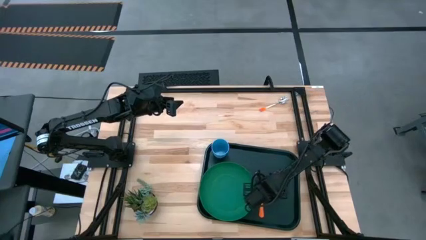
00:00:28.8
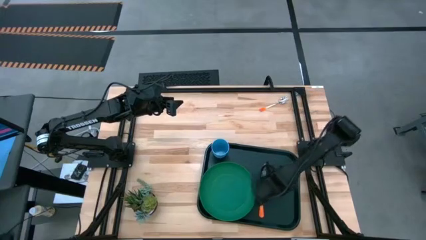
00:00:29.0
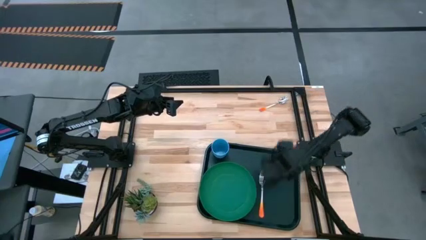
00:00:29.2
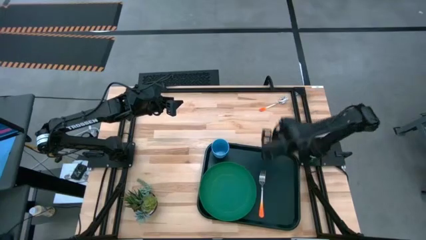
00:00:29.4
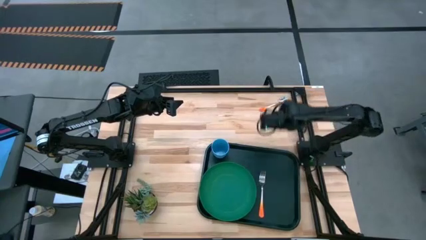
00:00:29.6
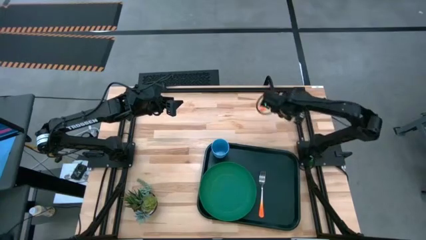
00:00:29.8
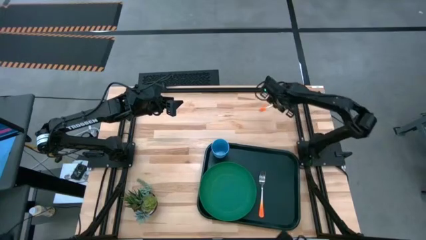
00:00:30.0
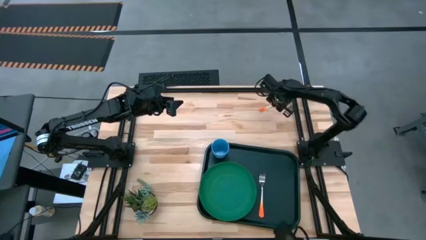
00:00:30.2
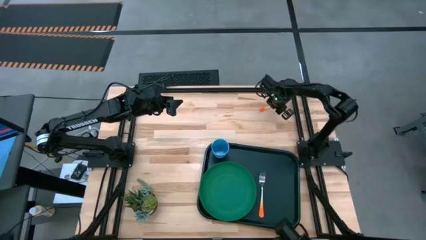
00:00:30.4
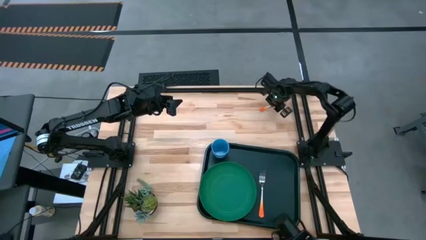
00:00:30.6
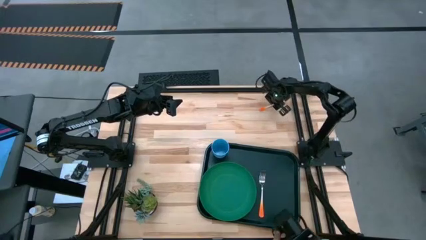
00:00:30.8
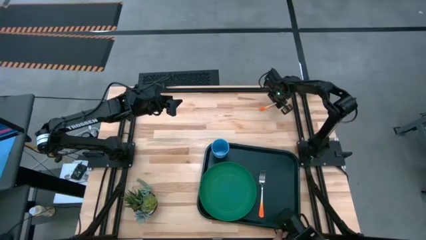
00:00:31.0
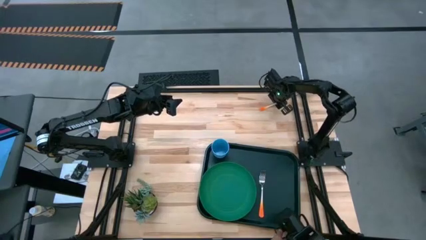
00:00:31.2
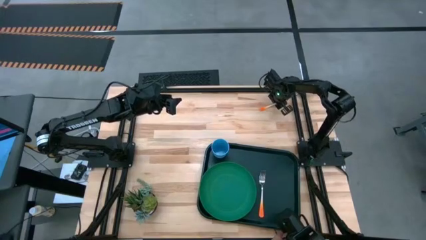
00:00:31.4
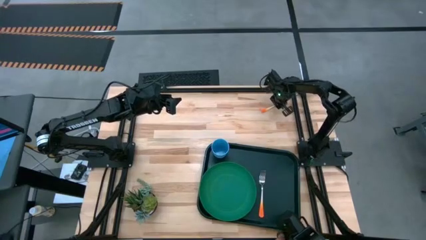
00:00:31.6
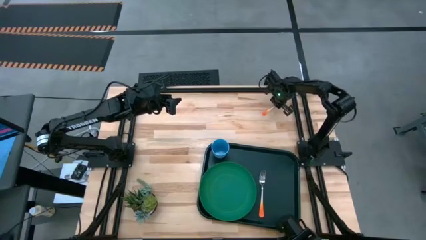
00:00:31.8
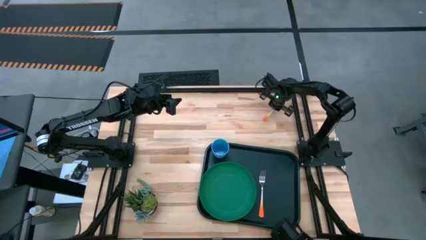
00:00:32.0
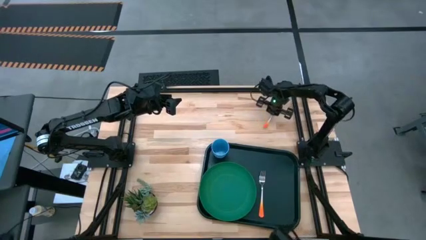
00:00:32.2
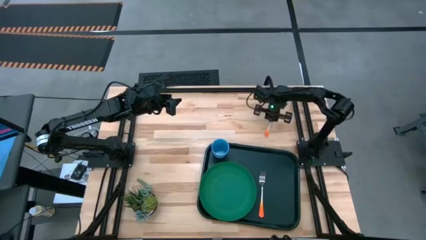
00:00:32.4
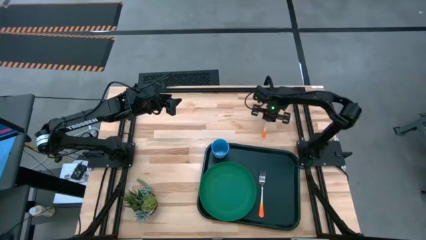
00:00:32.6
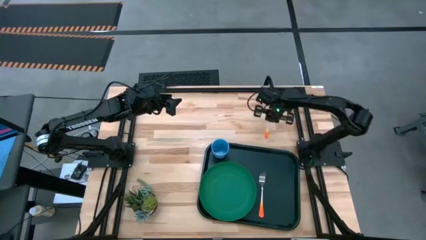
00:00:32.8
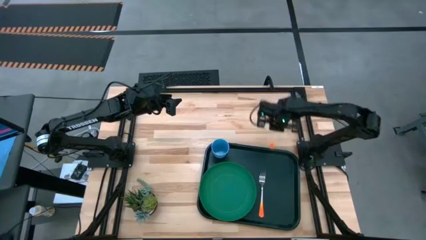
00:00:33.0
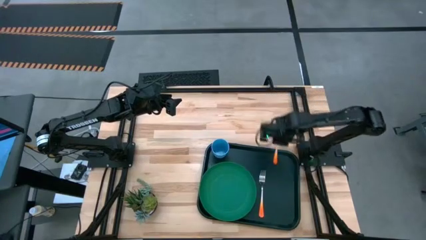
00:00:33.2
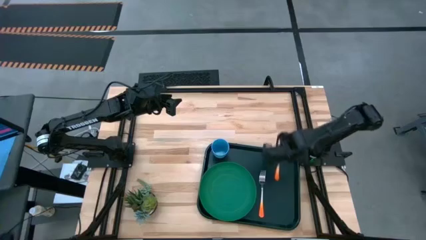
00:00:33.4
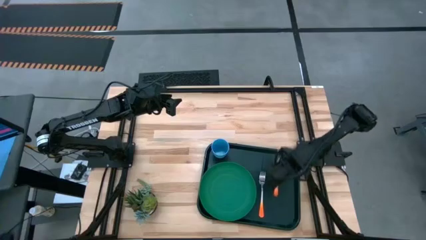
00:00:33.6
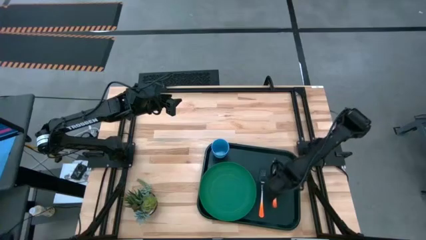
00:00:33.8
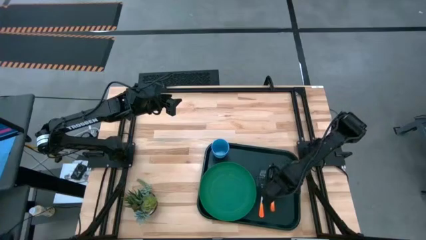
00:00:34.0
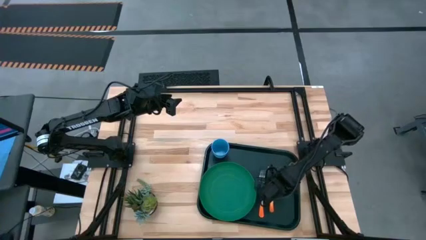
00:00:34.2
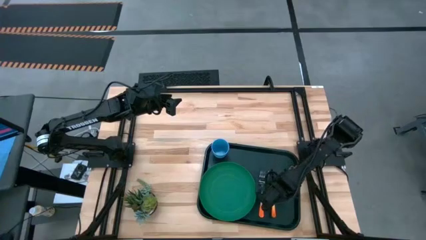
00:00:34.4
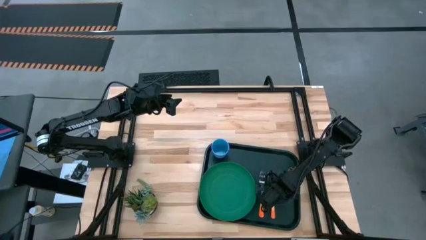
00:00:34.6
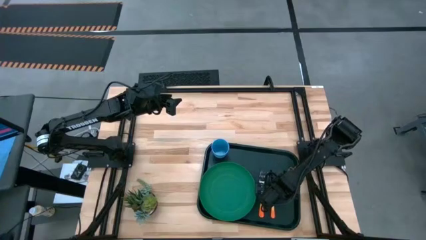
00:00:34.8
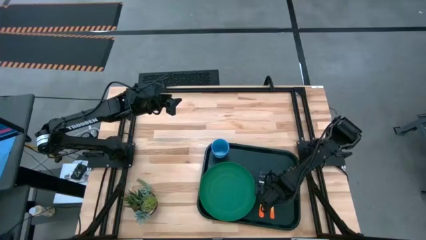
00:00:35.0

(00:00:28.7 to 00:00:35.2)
Task: Pick and place plate/cup/fork/spoon on tray
Put the orange spoon to the right of the orange fork on the black tray

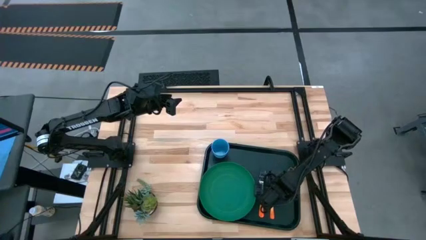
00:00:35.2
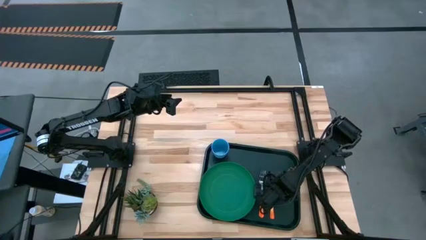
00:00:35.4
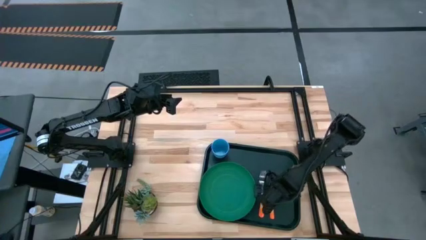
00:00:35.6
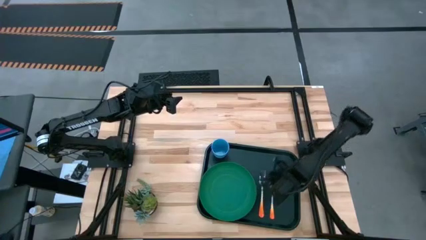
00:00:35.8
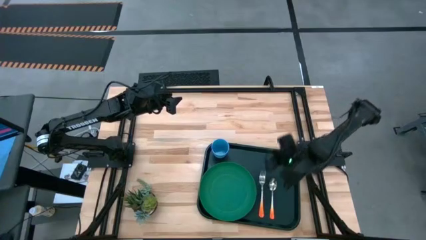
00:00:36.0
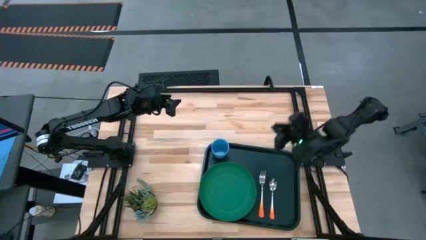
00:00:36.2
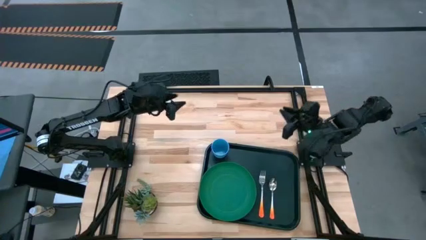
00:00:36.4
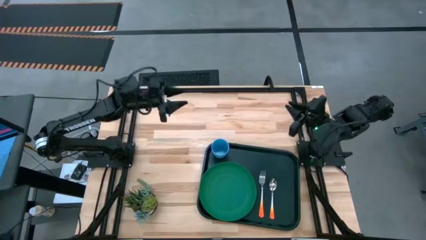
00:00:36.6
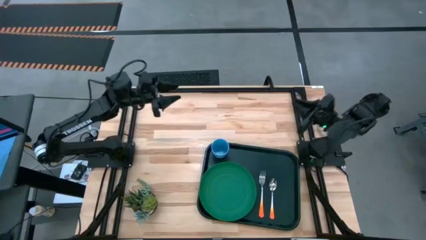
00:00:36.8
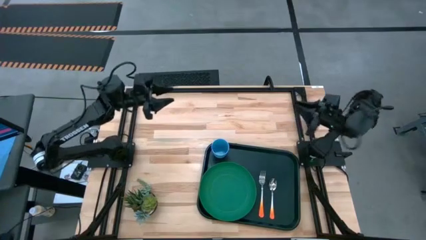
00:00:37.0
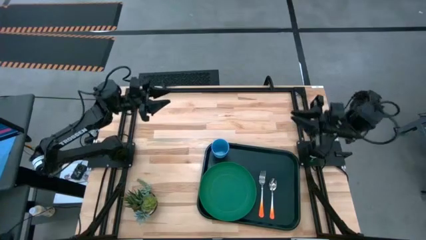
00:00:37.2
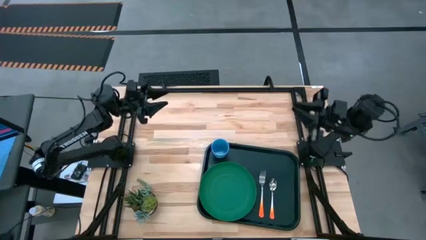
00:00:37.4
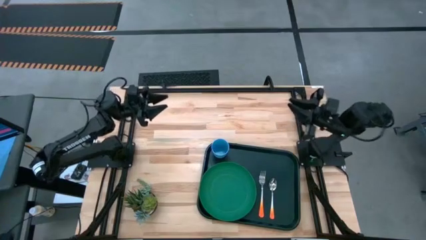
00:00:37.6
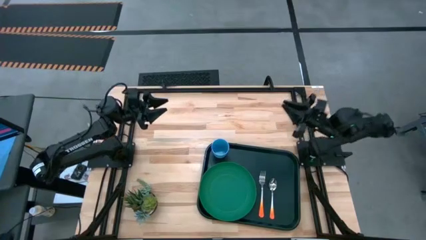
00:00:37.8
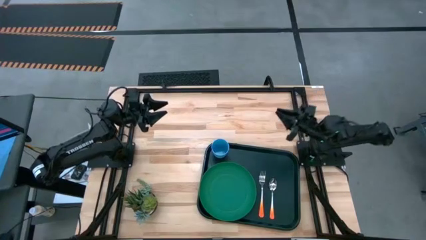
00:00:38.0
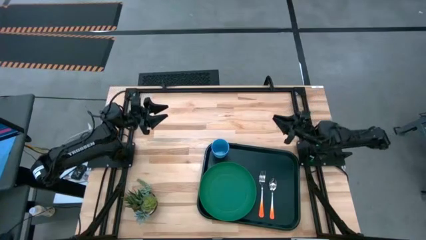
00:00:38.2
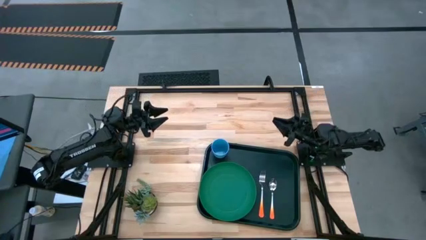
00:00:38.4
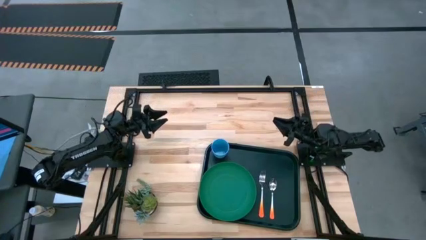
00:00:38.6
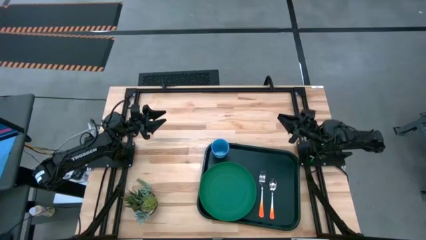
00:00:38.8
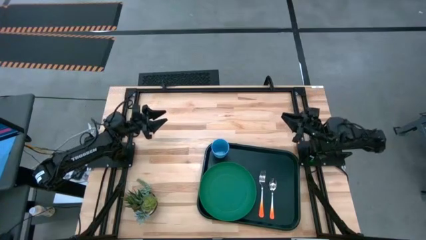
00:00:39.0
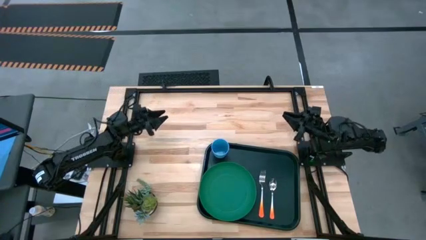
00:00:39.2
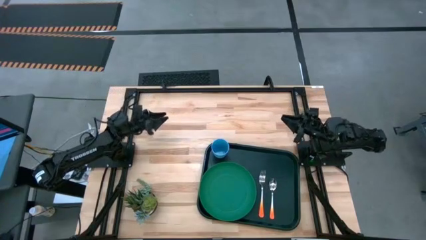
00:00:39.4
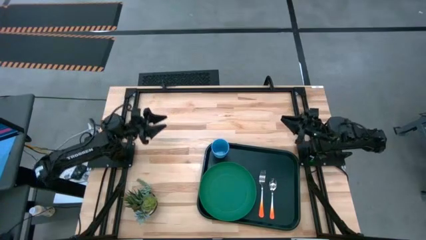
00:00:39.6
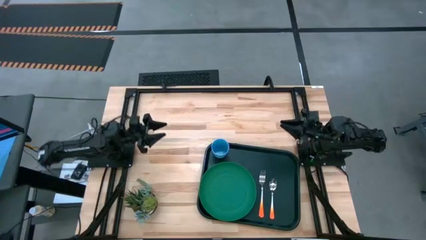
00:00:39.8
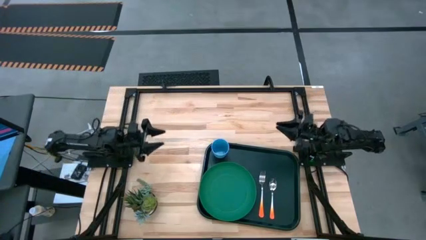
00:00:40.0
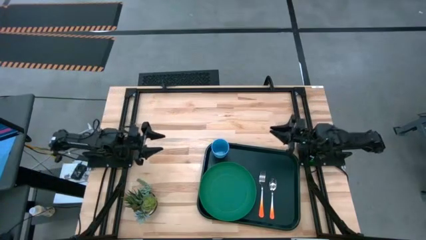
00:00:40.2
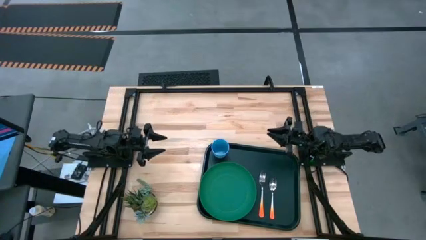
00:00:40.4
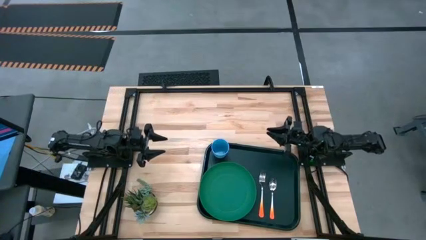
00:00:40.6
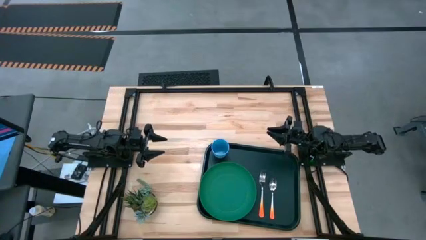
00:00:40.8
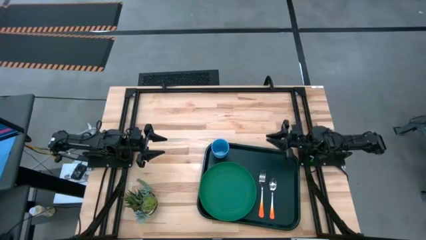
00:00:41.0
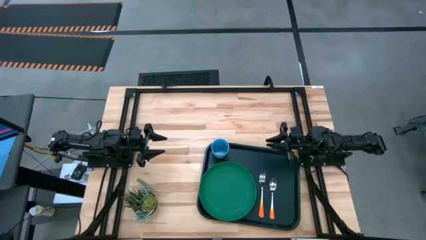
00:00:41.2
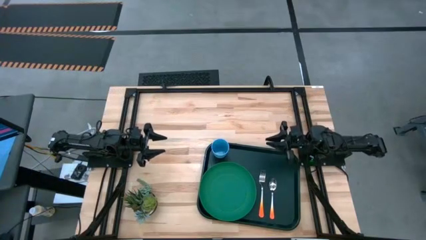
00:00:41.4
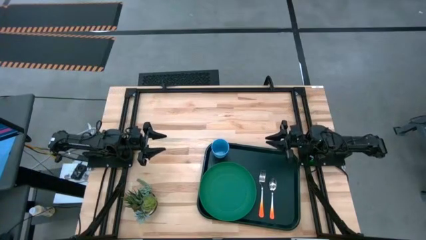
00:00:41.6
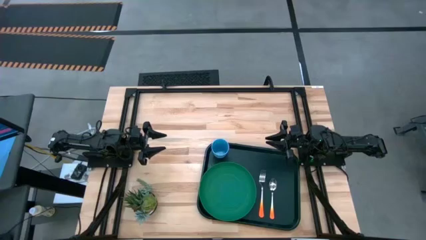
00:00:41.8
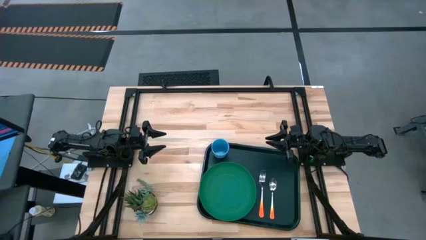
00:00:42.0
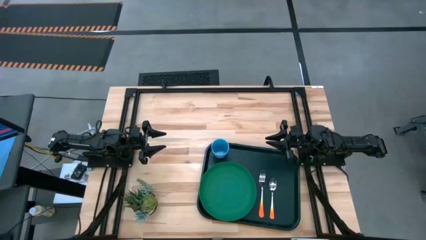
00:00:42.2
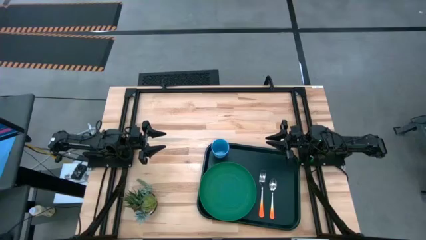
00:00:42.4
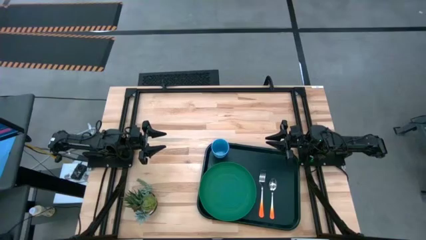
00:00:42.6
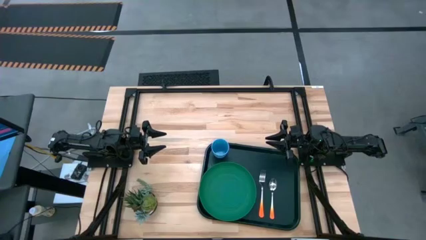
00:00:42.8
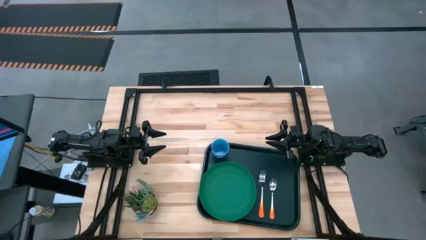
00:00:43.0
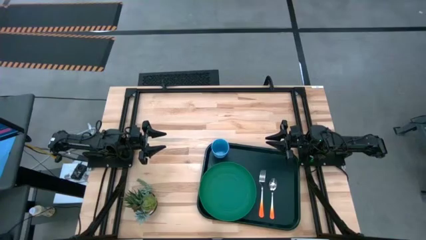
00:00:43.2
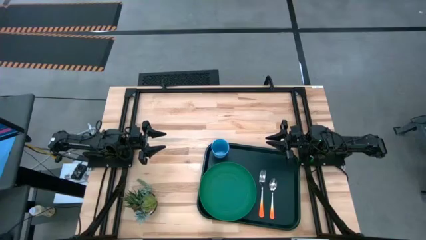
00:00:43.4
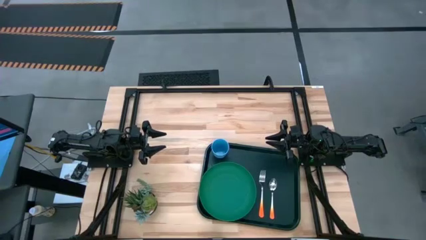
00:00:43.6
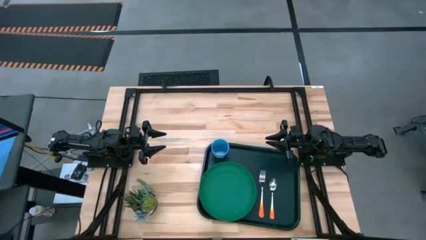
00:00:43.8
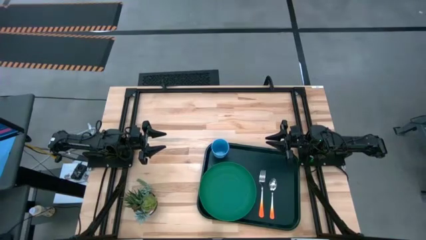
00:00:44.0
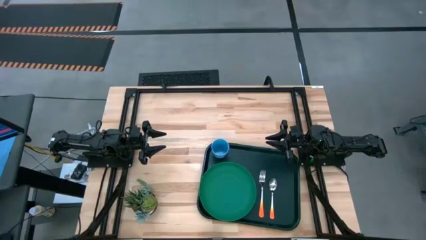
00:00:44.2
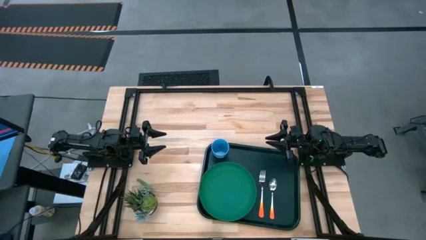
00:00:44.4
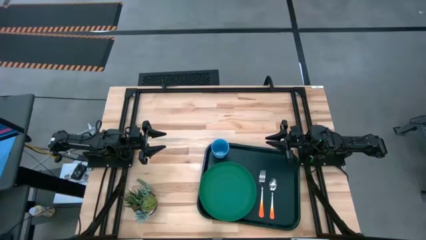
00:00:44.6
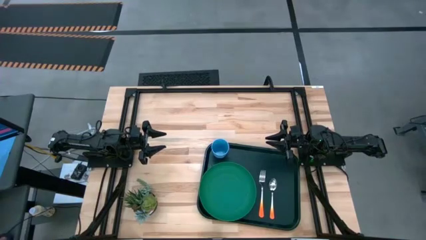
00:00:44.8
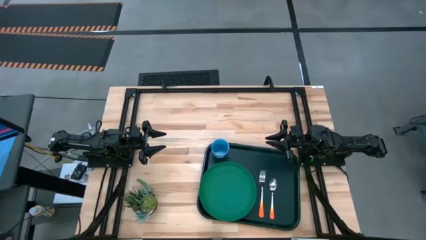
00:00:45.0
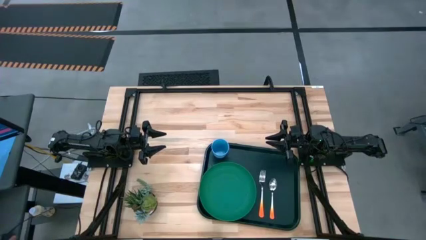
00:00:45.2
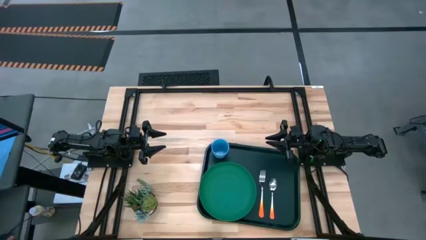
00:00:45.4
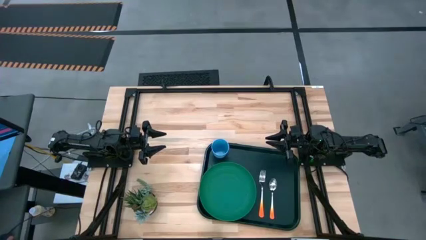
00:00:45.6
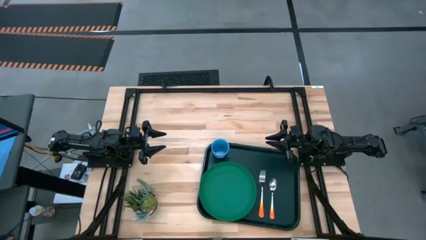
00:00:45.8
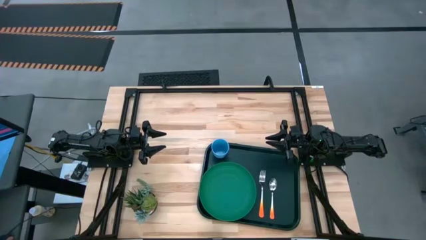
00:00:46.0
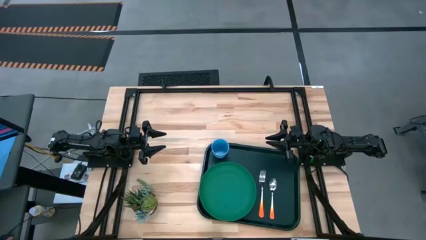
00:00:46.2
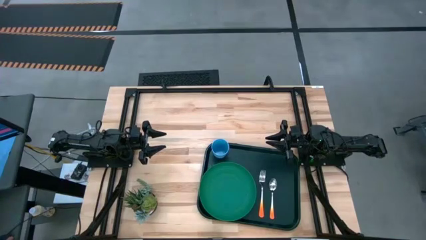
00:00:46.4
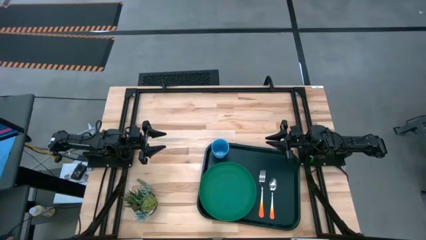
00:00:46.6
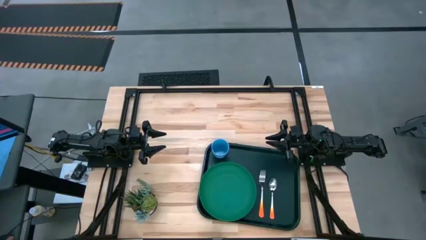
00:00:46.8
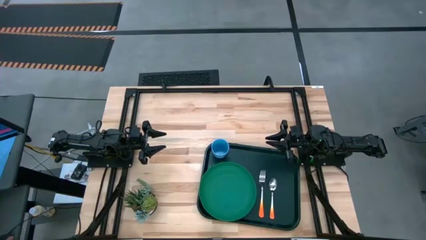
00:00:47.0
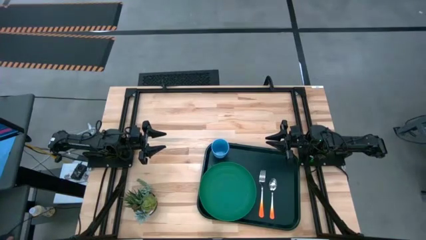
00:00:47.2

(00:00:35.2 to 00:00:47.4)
Return to Home Position
